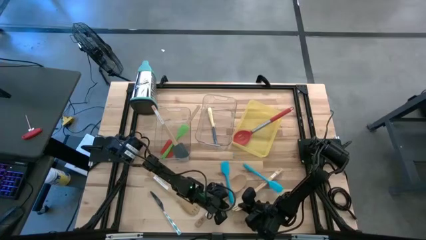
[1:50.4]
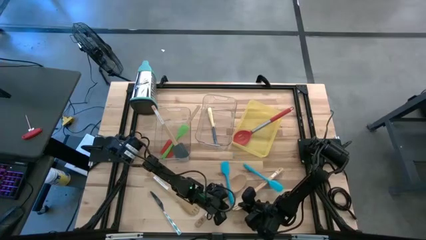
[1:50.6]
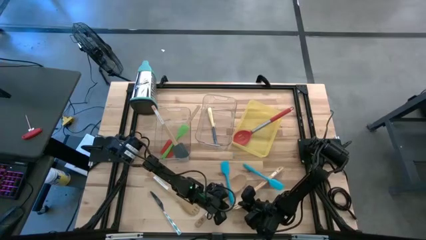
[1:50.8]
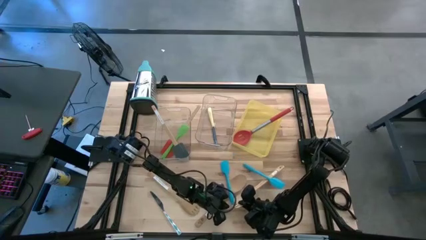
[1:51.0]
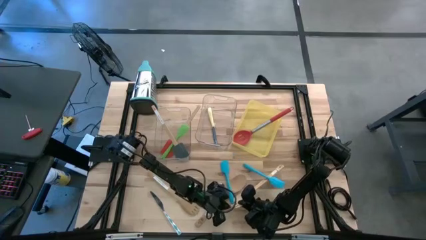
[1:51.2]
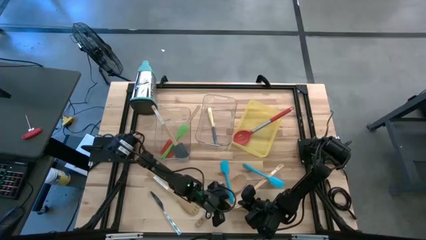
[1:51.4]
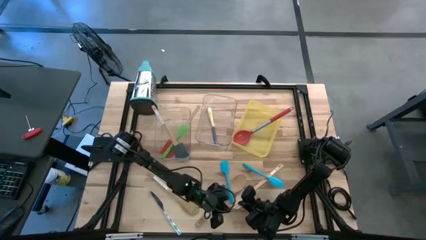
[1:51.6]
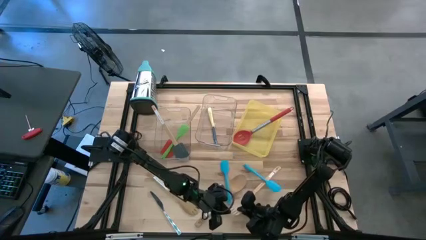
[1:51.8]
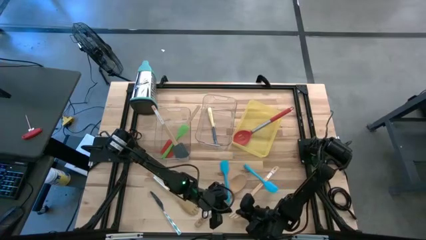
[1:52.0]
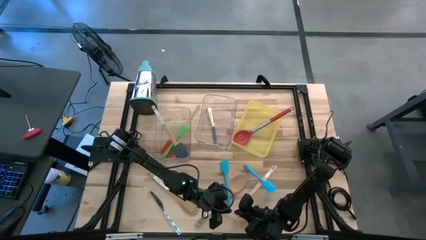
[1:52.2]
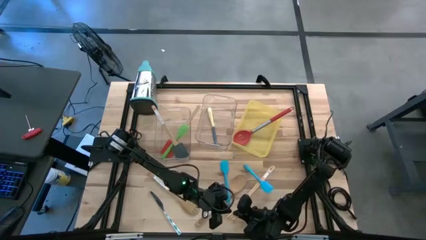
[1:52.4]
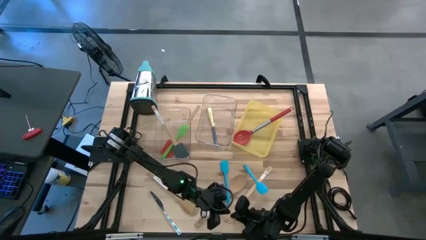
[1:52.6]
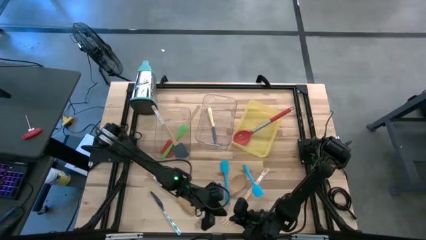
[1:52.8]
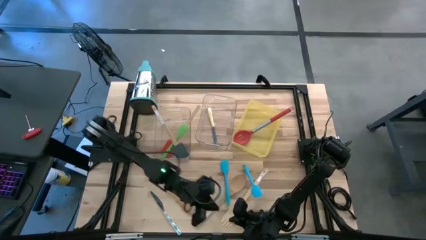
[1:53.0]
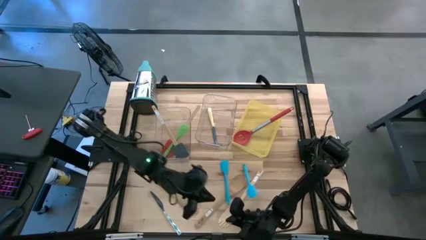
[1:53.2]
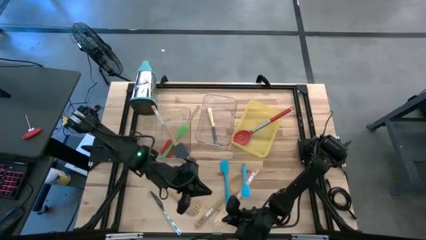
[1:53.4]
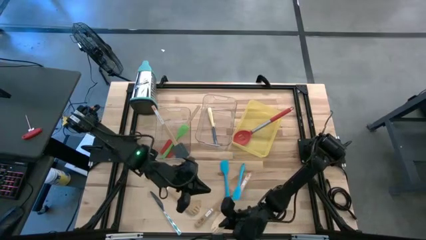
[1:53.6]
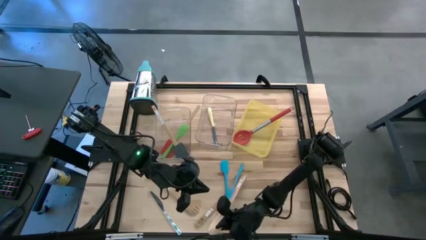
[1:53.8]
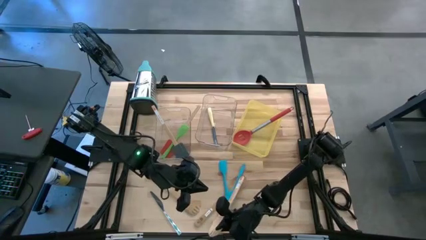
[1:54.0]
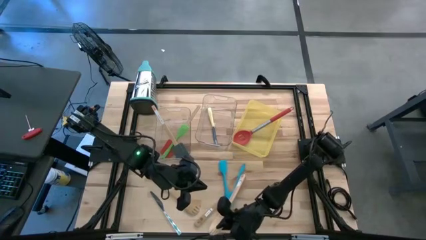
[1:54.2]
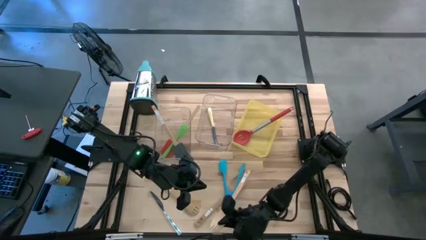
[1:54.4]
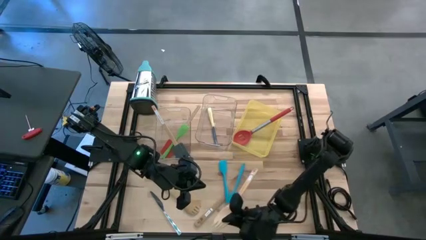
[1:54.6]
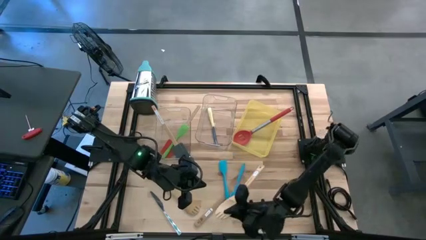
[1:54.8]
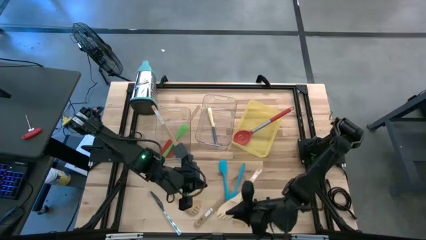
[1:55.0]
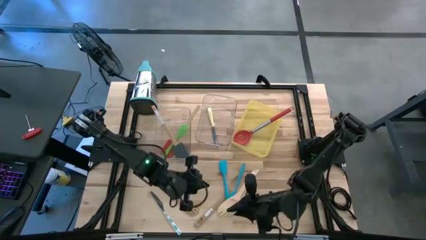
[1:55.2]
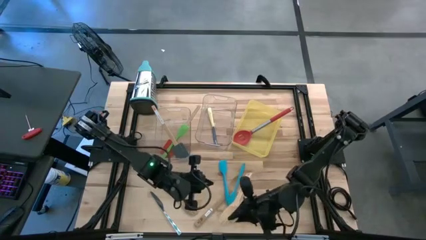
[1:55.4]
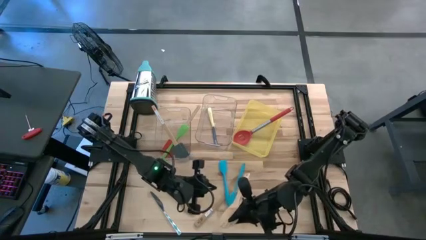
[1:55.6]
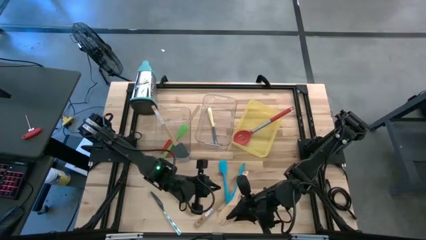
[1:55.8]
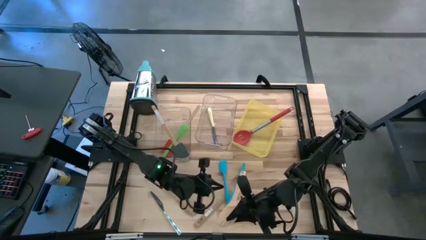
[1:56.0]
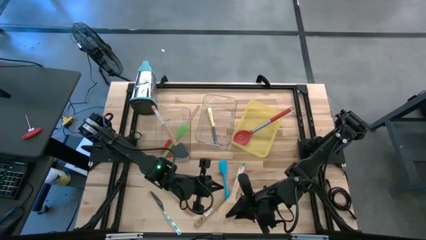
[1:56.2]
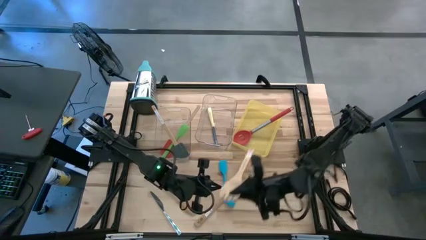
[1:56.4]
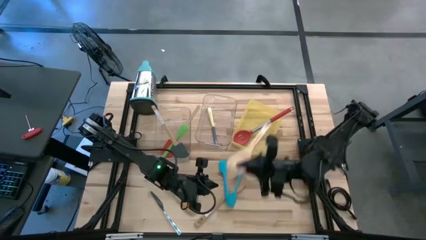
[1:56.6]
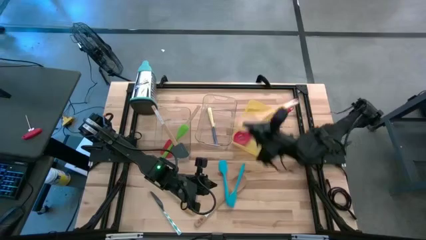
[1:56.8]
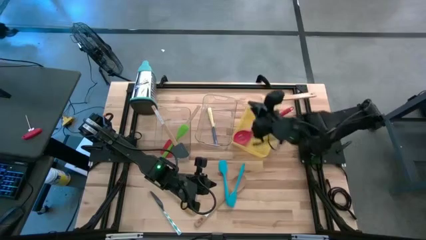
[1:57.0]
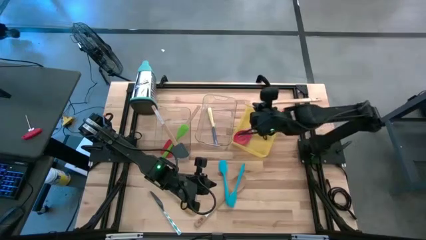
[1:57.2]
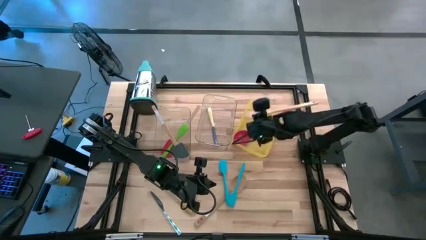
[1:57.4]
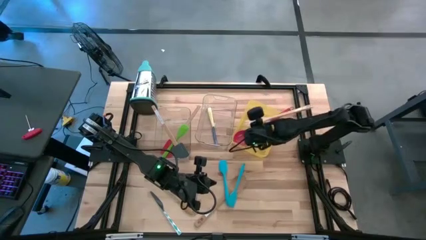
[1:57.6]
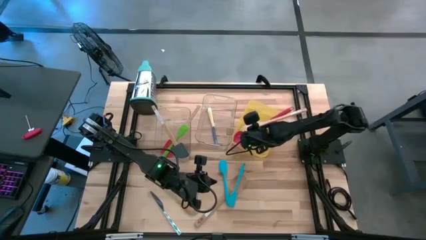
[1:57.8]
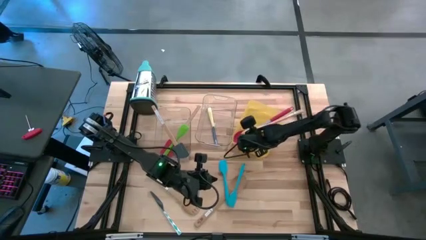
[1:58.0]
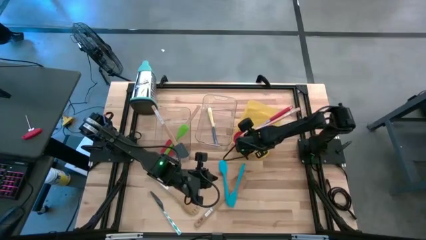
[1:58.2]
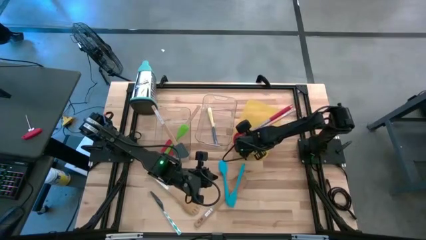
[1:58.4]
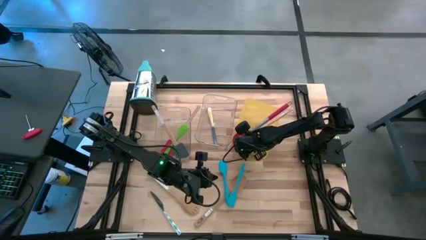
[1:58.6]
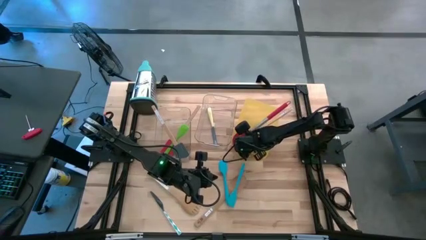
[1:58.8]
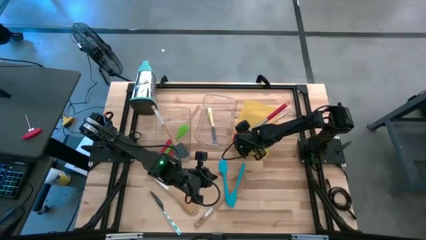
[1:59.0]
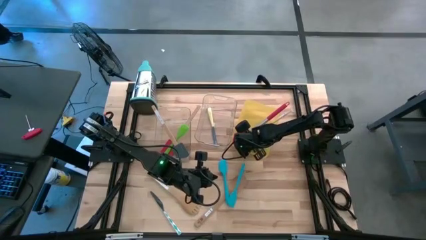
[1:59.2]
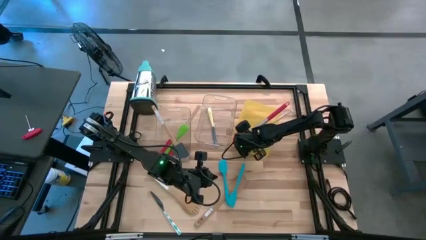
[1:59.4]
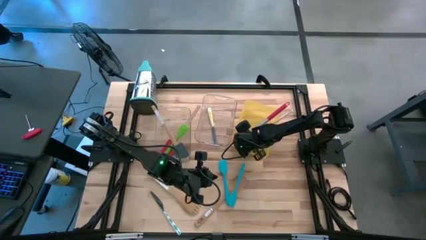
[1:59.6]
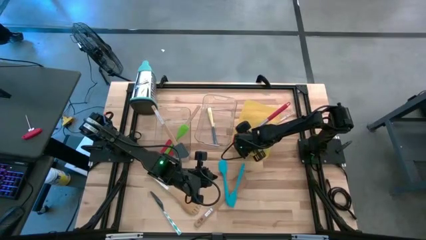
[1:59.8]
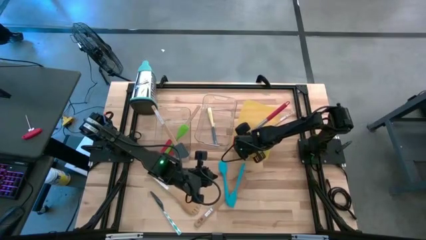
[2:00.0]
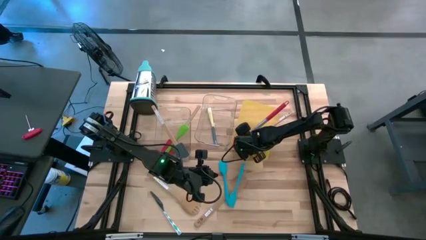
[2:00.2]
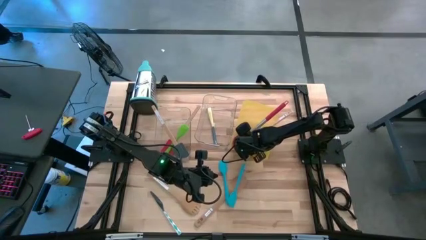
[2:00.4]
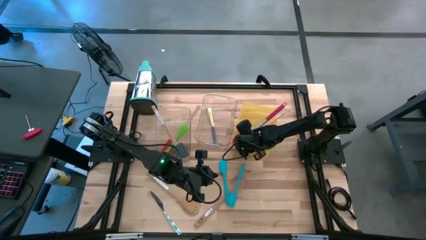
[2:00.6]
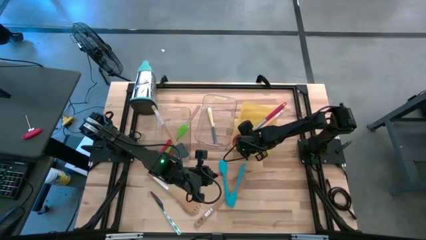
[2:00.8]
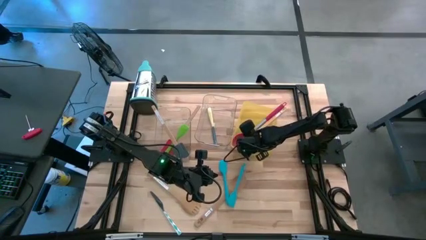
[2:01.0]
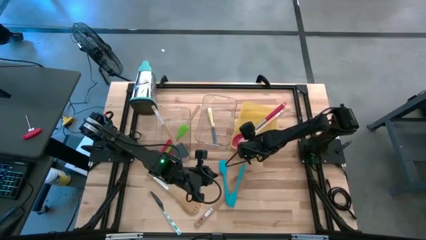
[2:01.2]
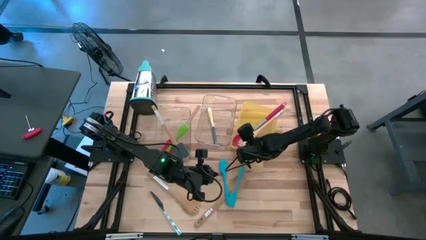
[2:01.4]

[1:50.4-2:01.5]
Task: Pick & Place Kitchen Items
Put the brown serving spork into the yellow bin
